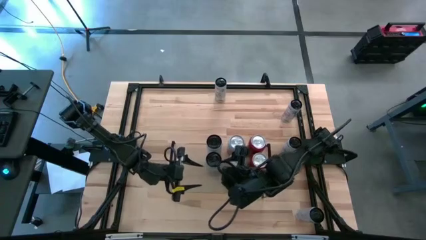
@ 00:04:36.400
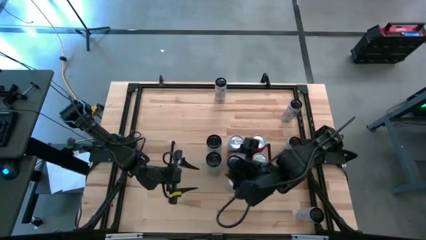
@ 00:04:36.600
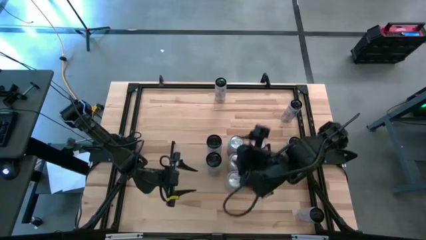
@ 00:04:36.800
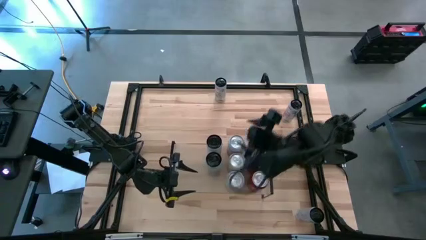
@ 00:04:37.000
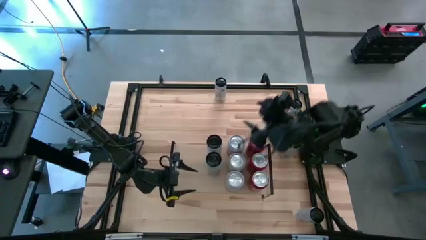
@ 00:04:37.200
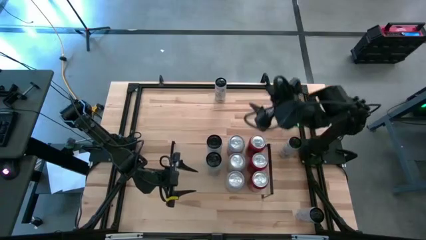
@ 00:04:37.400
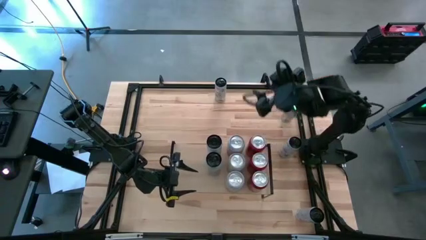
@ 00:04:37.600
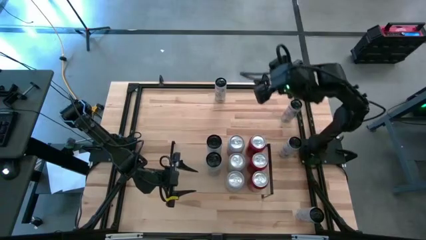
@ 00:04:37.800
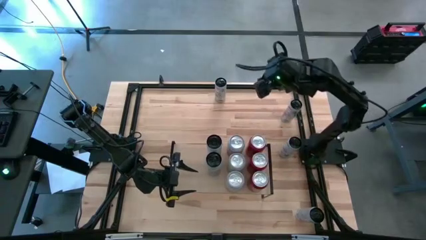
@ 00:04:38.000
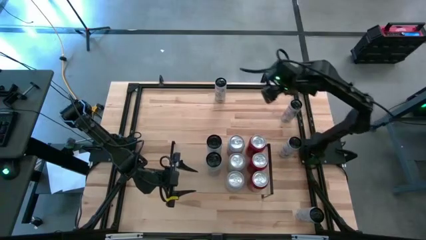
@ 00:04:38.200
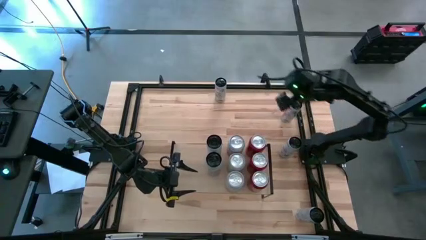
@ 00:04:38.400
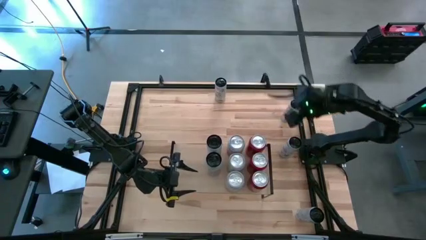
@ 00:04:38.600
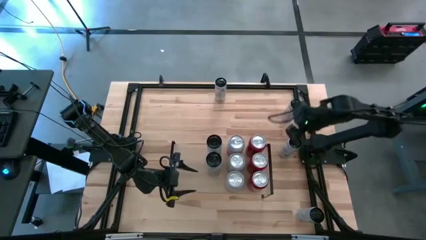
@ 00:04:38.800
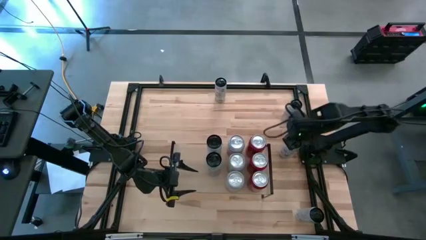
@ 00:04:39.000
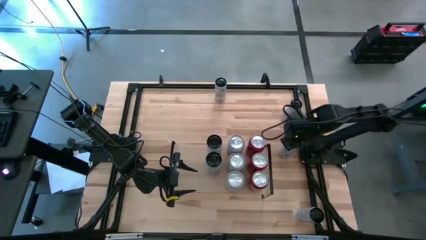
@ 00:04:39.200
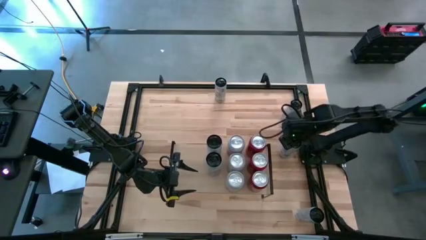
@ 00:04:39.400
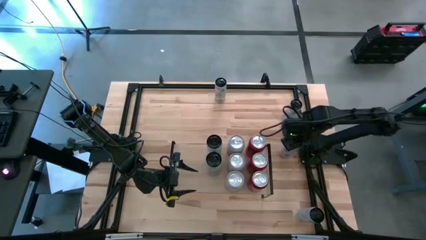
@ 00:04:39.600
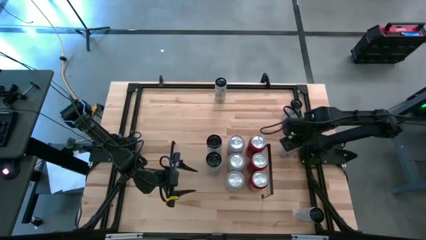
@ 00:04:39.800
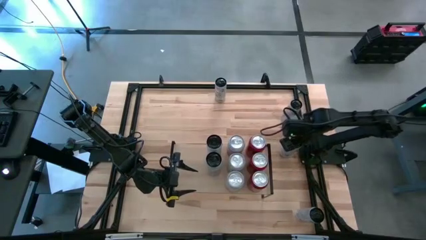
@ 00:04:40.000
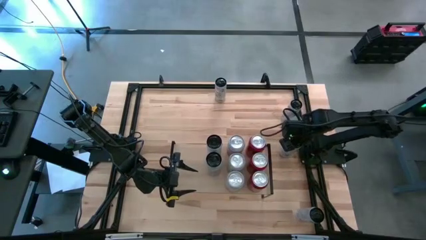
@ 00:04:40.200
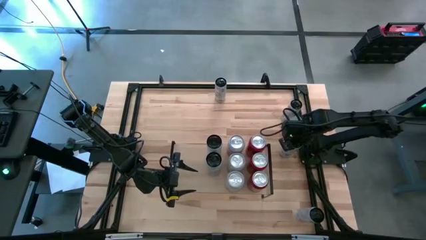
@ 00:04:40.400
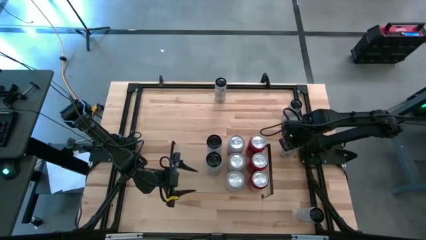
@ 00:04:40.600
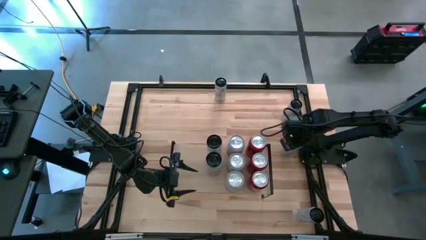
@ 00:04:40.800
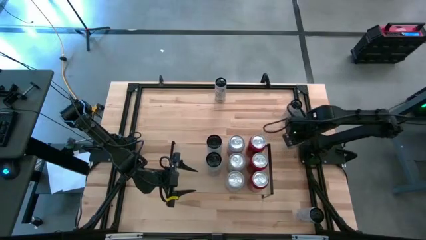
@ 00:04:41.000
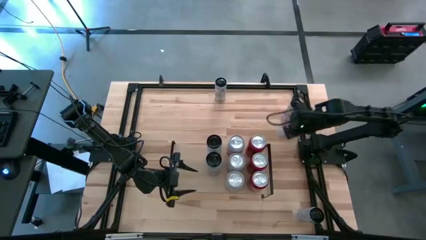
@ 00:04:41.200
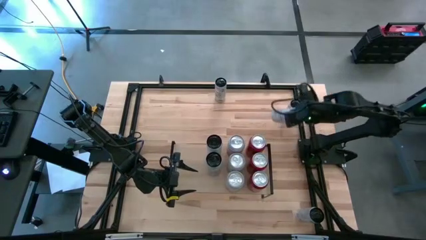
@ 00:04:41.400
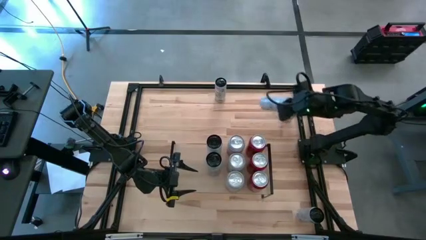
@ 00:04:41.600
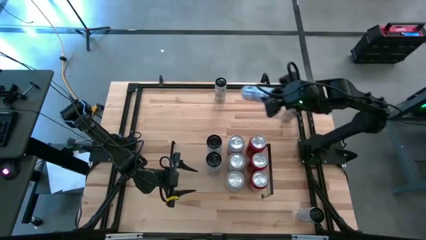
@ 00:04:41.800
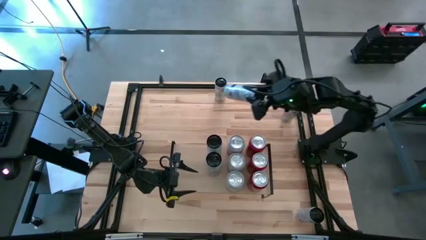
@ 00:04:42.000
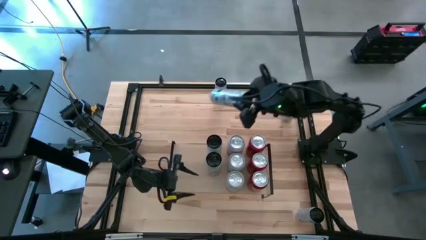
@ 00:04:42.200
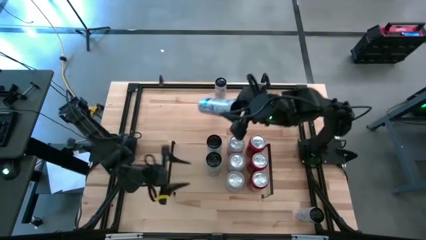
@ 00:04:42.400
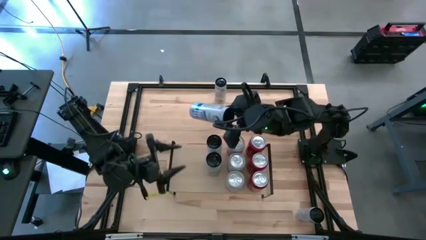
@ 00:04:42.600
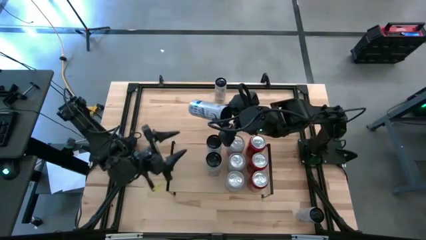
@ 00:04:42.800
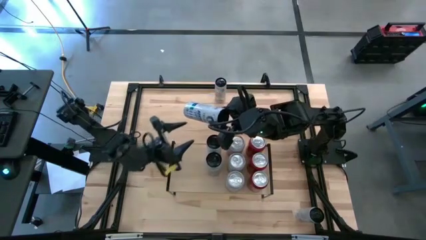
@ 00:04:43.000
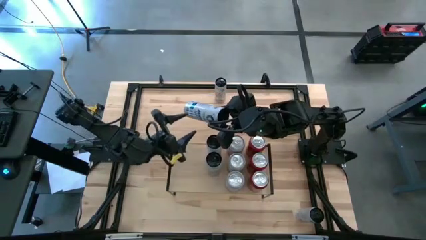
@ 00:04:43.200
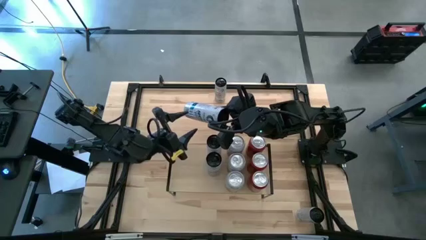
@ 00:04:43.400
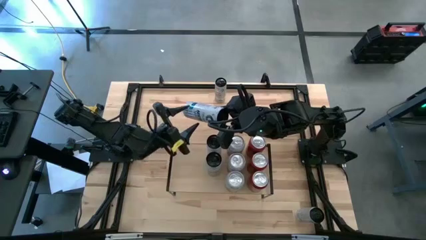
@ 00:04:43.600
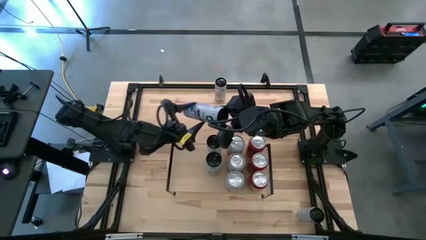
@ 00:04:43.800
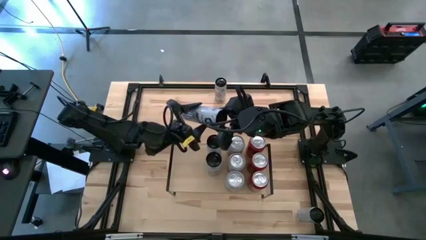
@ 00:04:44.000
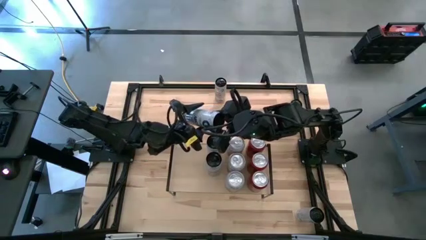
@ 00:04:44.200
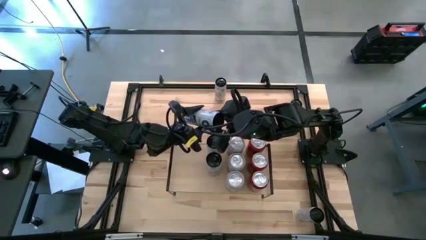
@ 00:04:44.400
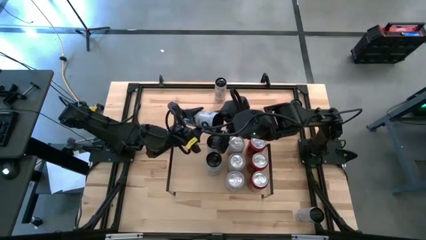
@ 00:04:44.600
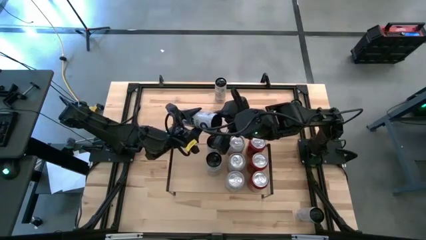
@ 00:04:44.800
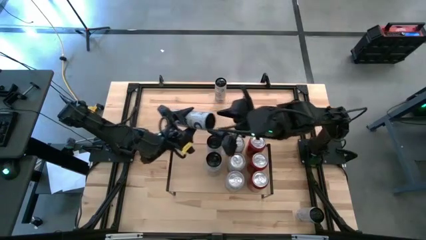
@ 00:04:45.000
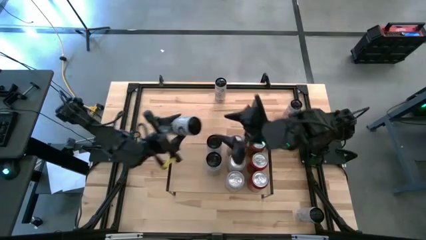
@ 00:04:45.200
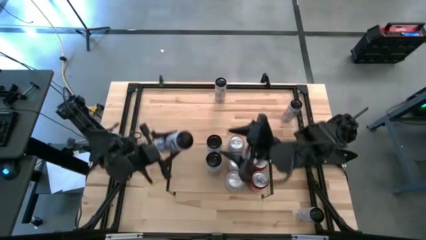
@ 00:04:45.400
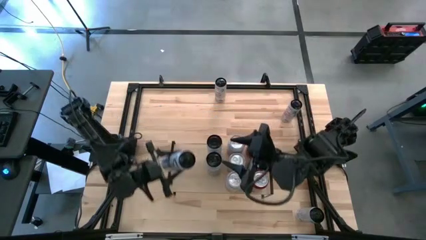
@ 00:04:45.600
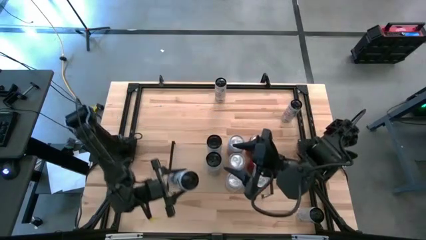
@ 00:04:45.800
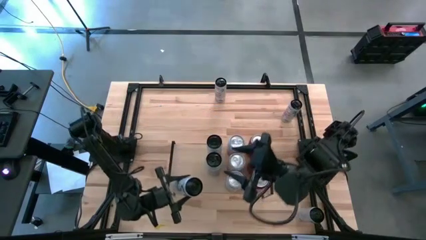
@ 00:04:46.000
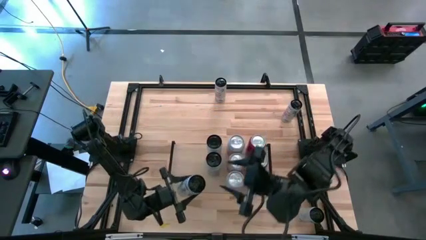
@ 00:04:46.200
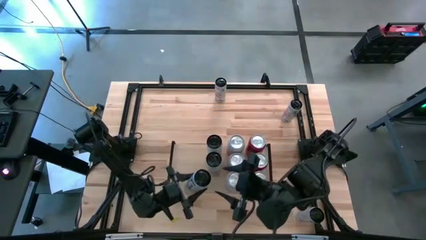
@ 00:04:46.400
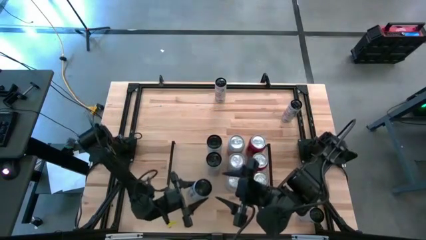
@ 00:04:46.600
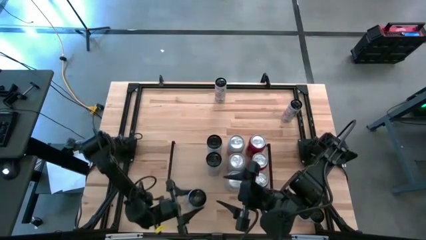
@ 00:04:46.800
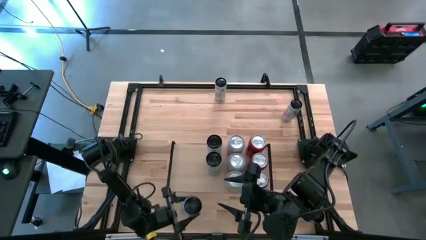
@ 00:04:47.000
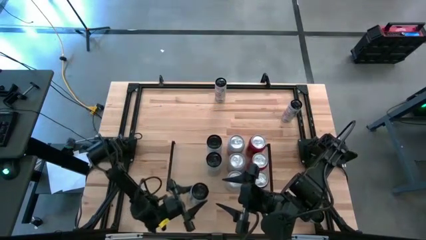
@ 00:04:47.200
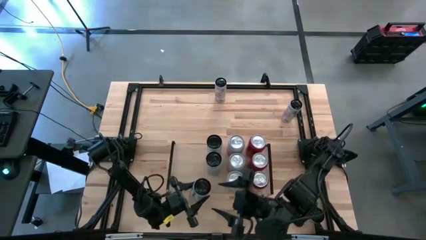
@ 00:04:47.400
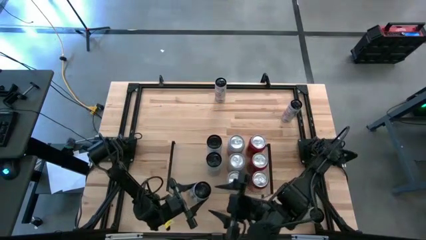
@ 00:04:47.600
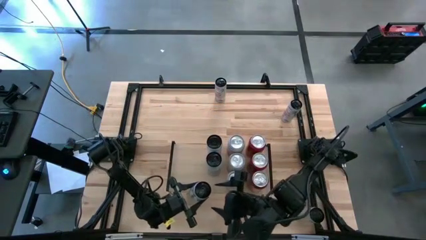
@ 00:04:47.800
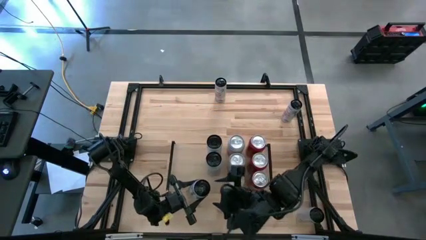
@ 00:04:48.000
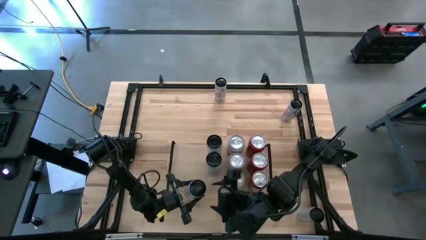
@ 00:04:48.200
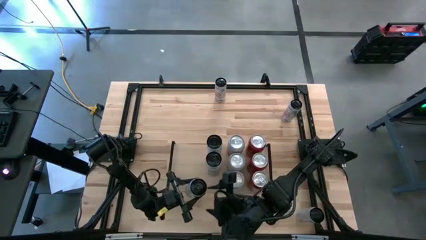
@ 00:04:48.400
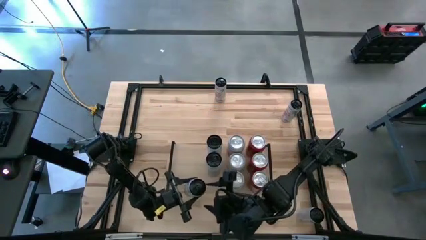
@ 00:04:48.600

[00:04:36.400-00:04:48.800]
Task: Place canned beverage on shelf
Put the white-blue soda can on the shelf aligned with the other white-blue soda cans
